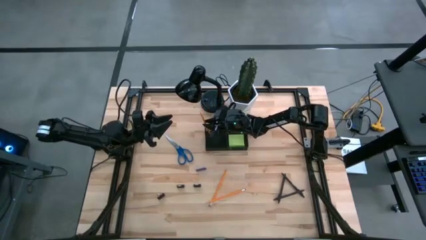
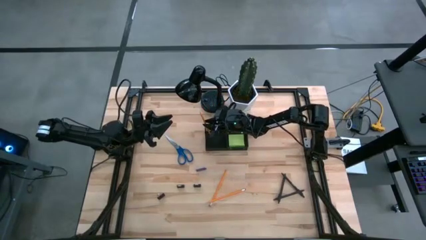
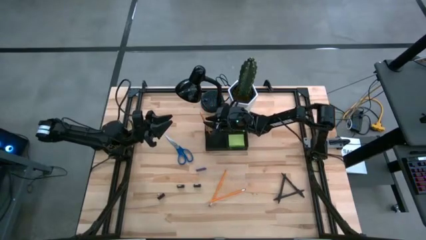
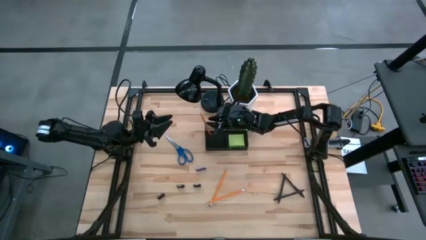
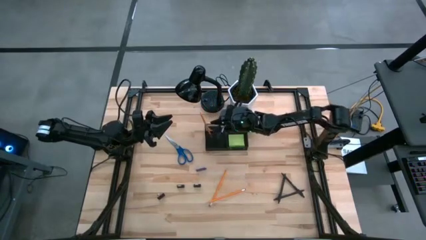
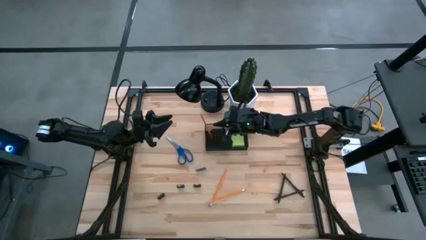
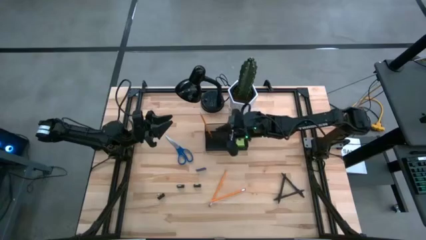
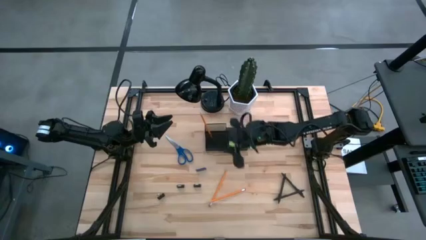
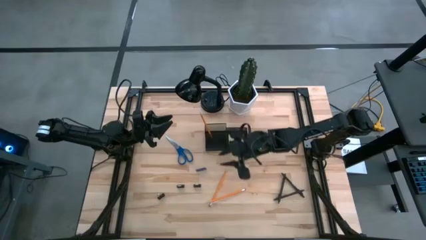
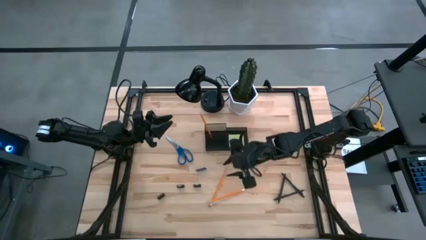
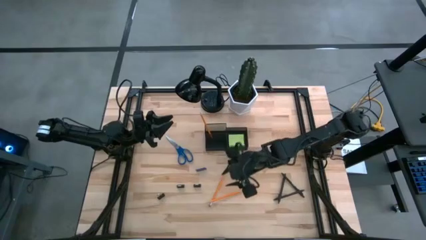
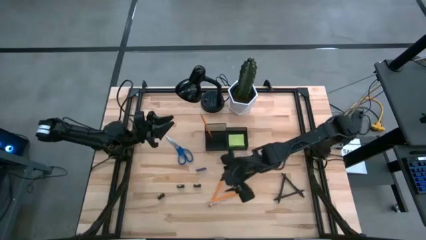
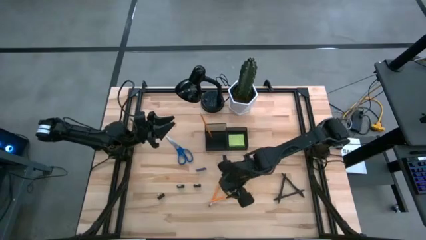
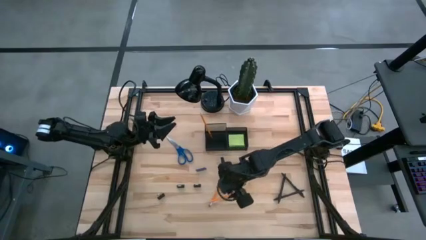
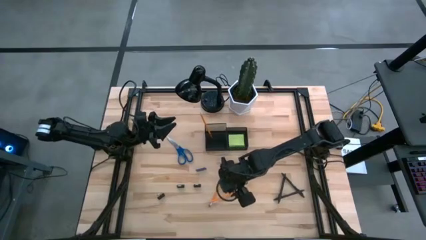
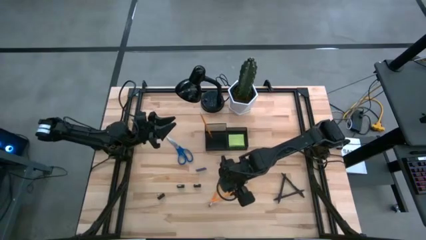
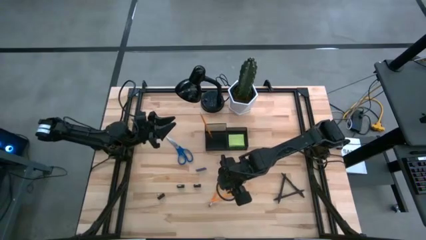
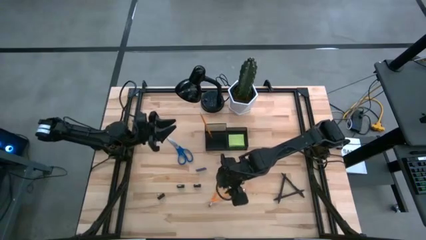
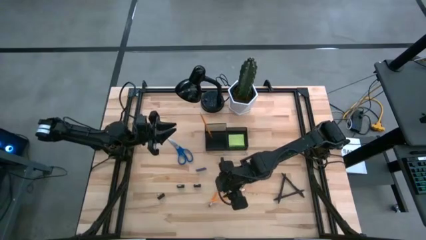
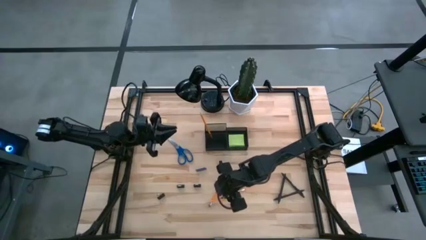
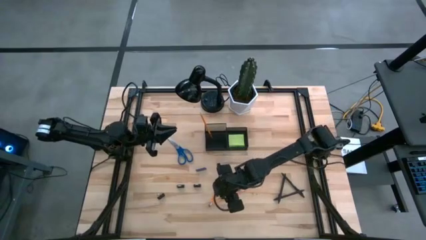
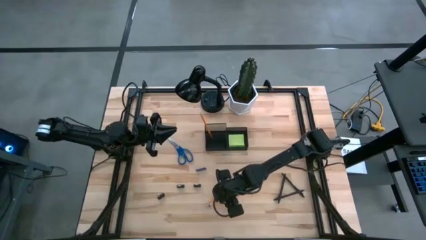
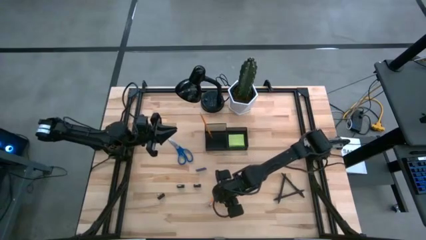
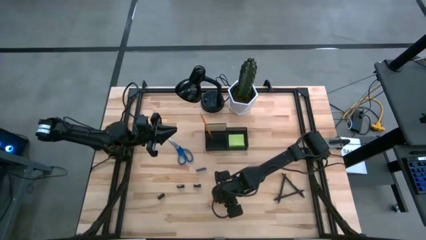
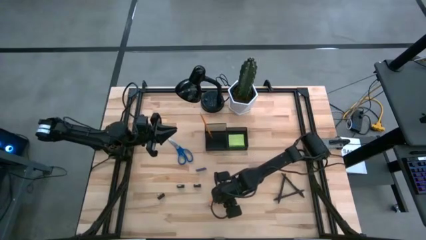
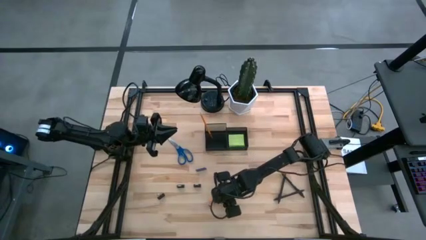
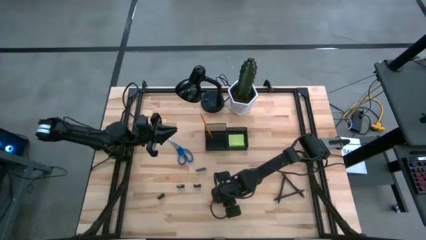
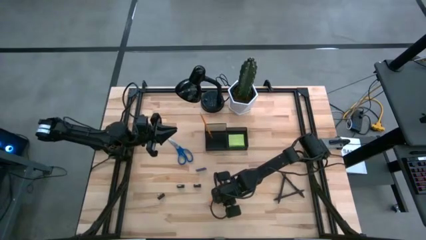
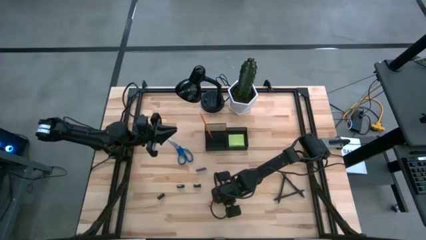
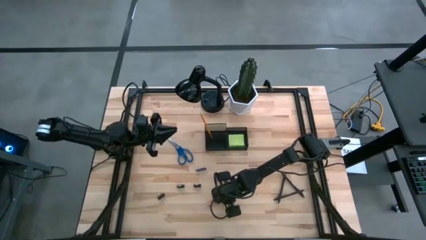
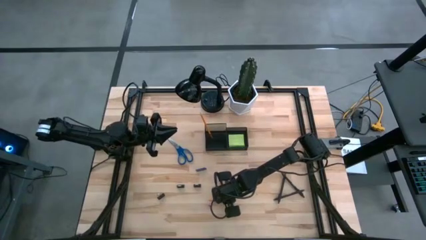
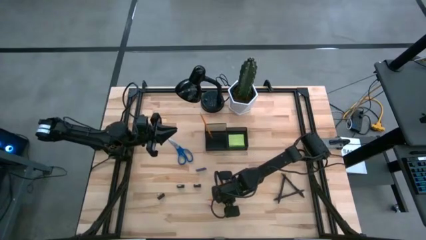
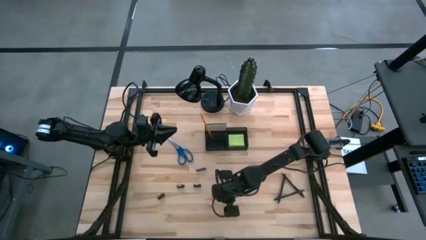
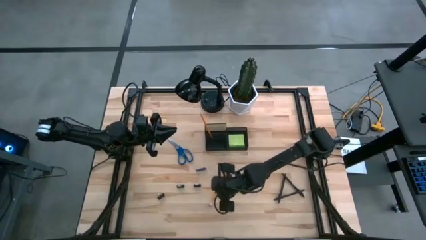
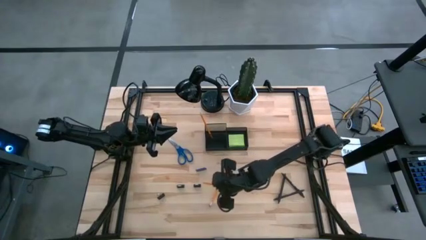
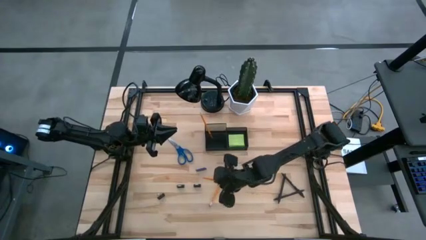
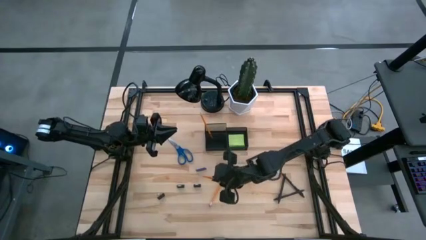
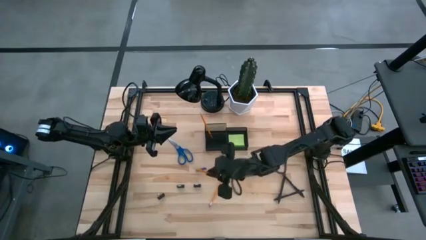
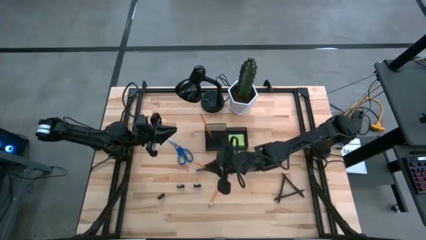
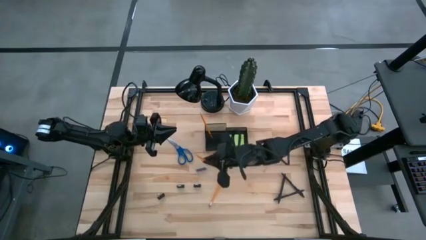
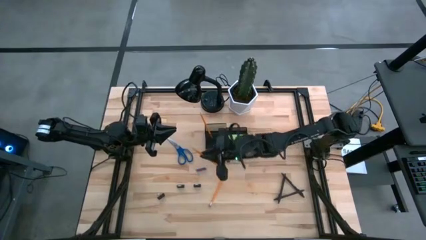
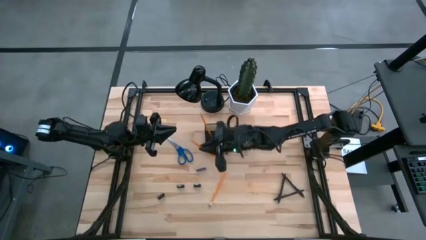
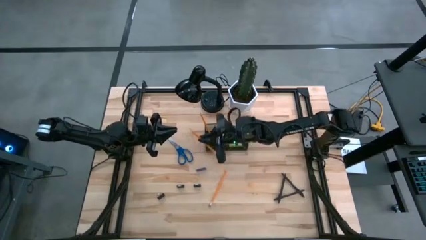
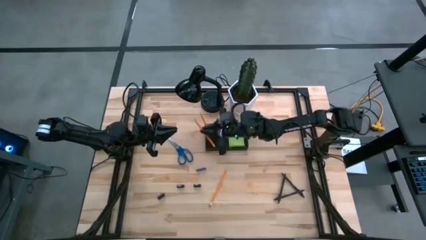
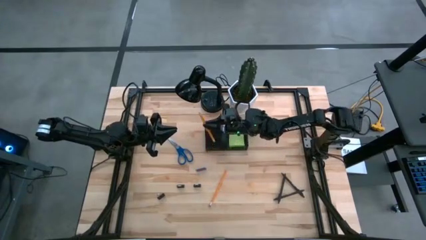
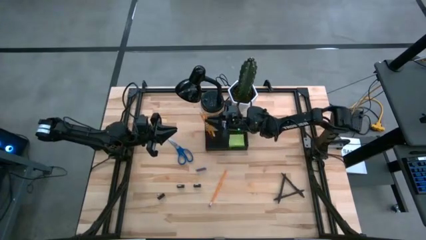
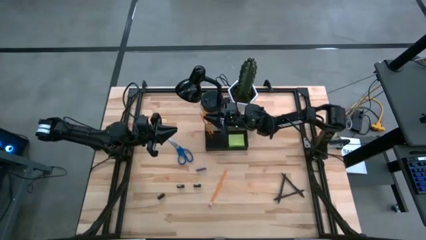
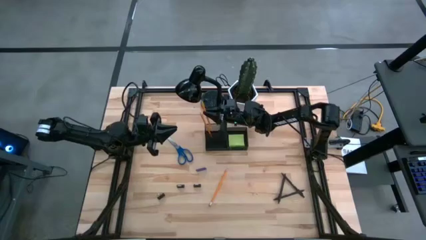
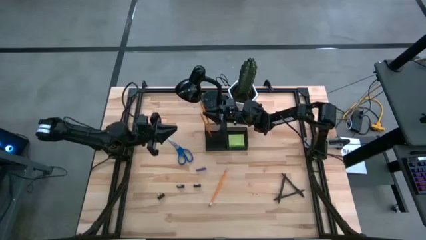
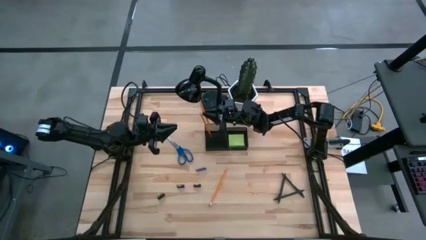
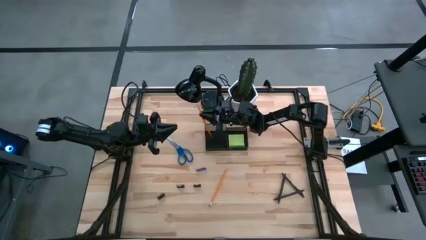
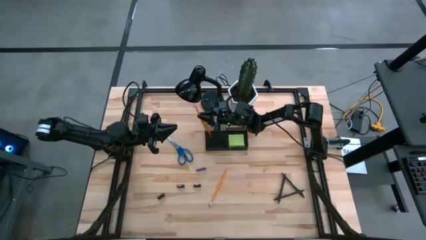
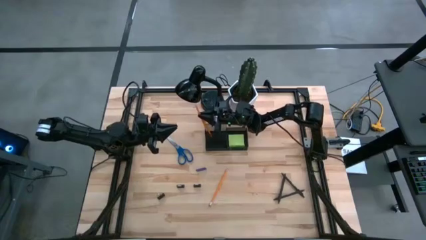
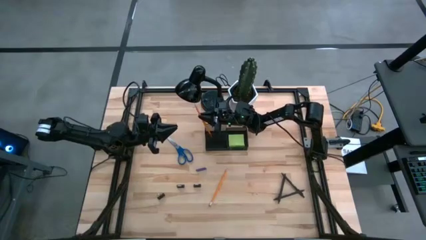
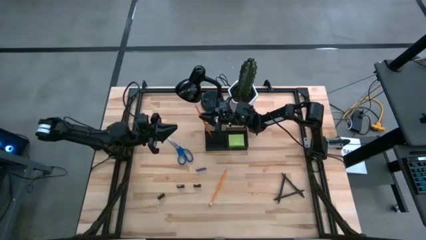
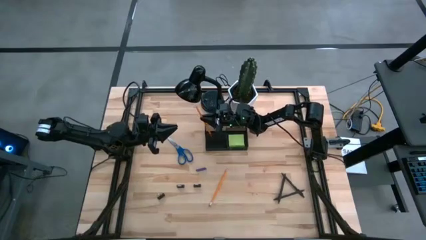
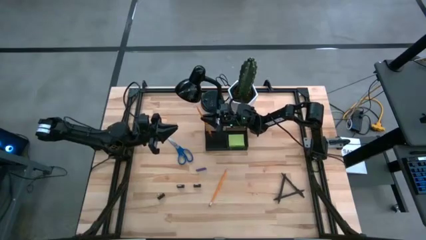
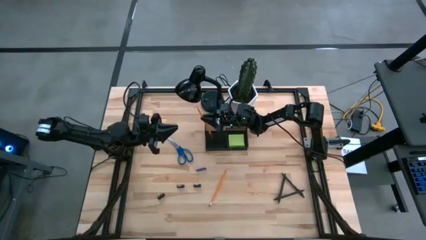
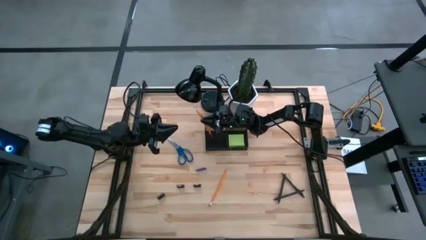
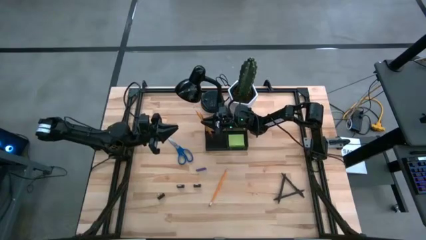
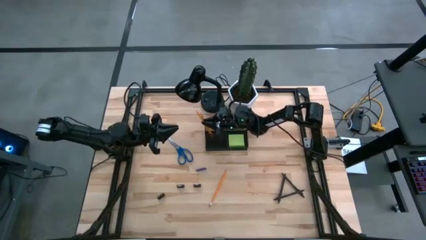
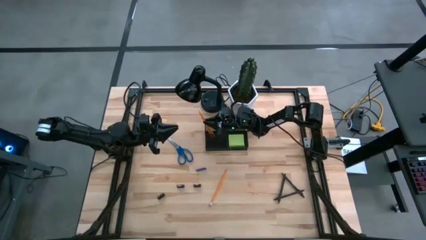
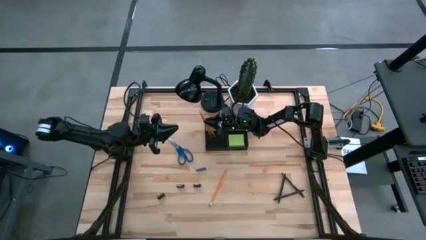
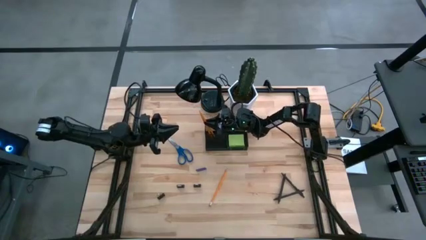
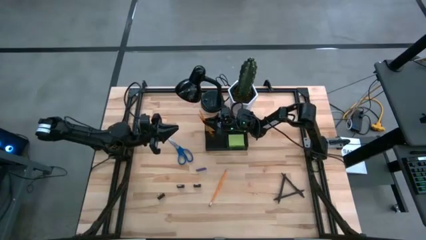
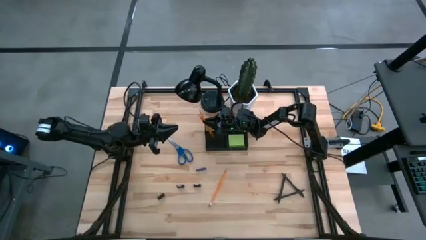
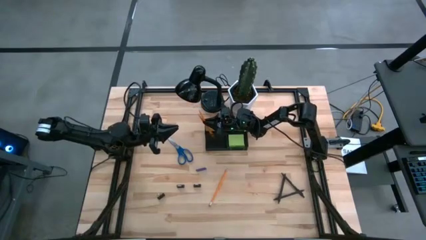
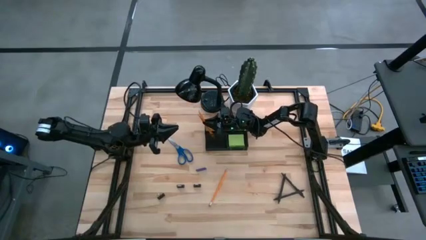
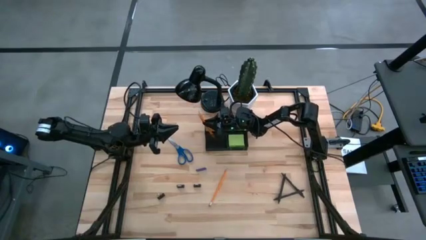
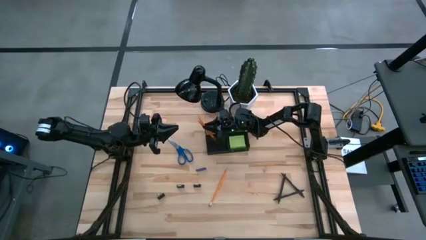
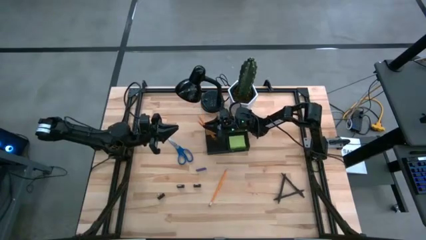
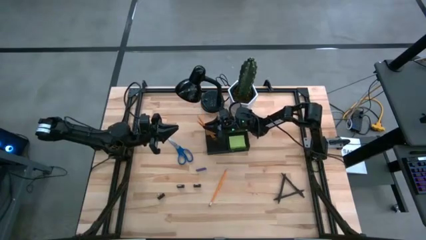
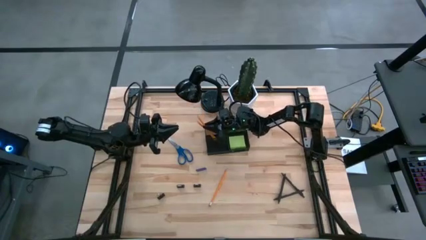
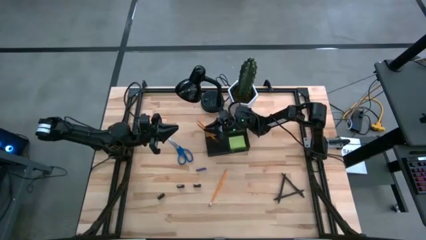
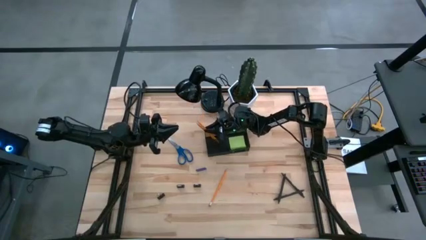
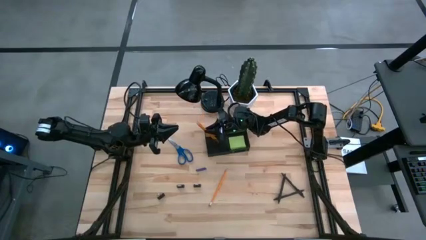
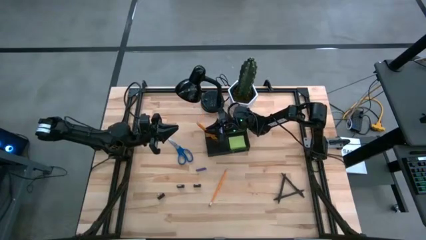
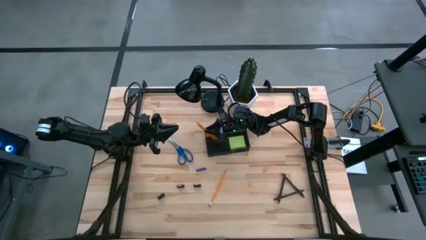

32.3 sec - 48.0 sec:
Task: Pick and place office supplies into organizer
Put the yellow pencil into the desk organizer
